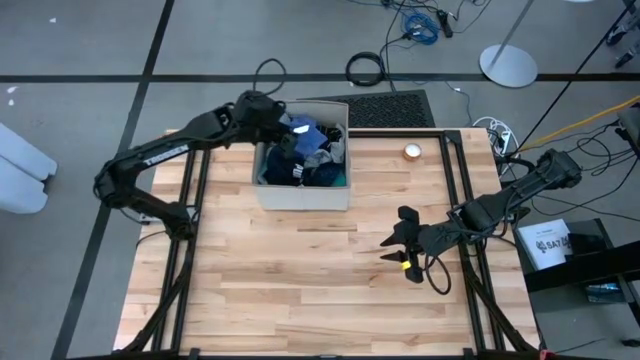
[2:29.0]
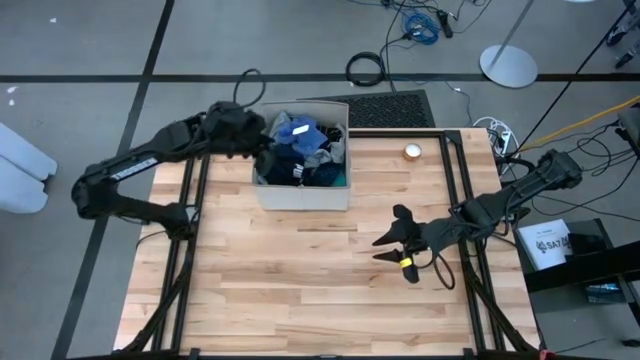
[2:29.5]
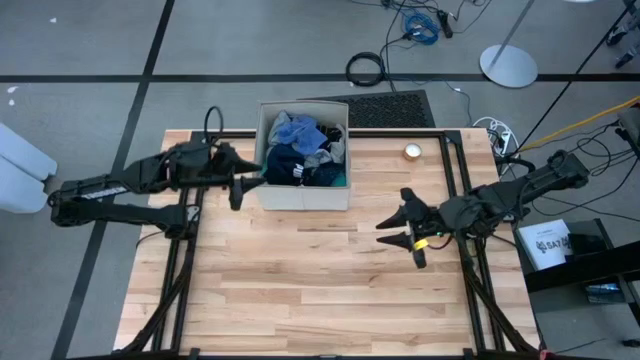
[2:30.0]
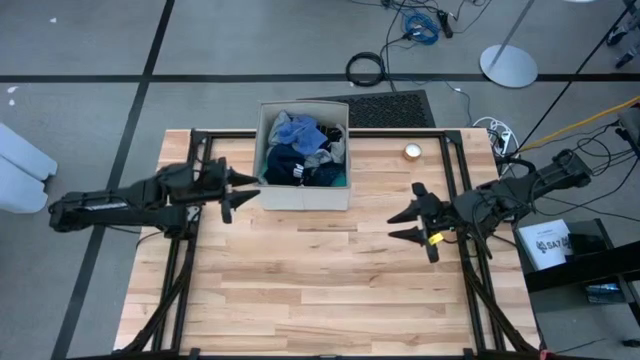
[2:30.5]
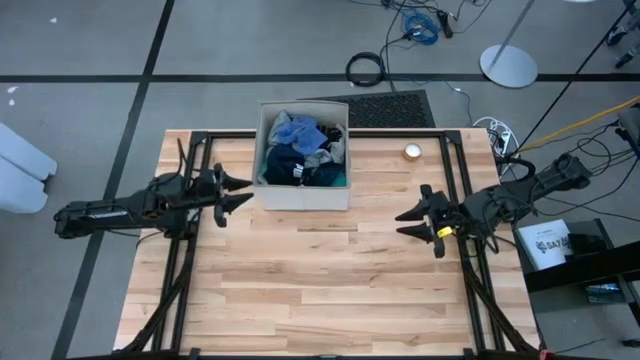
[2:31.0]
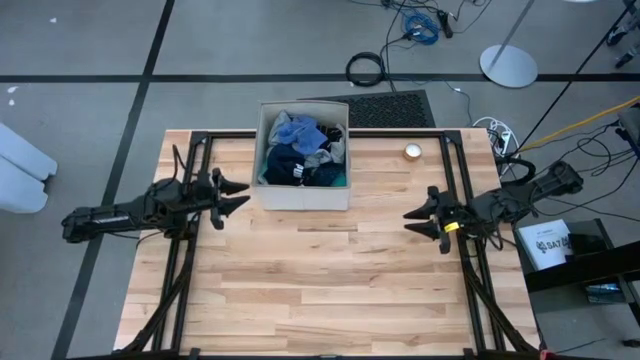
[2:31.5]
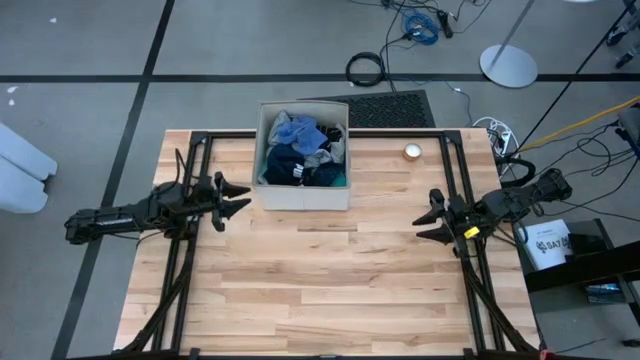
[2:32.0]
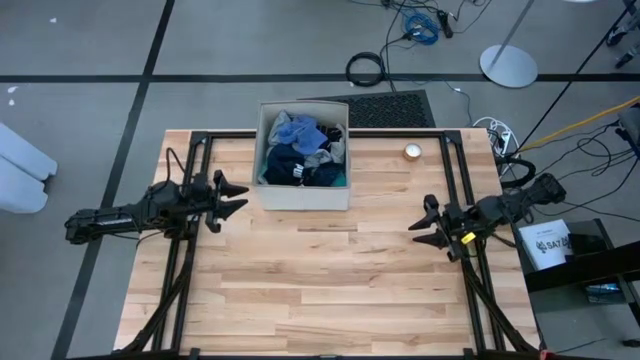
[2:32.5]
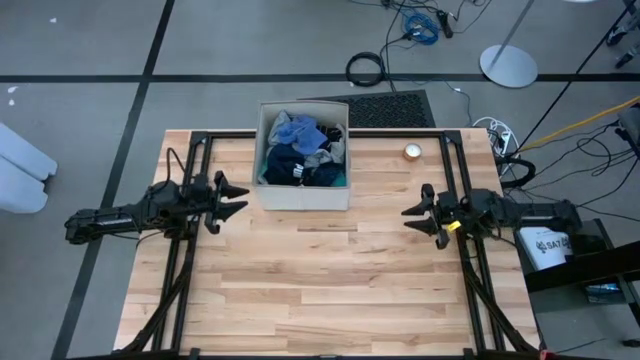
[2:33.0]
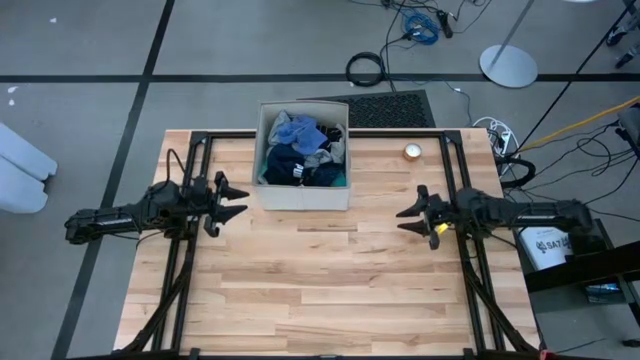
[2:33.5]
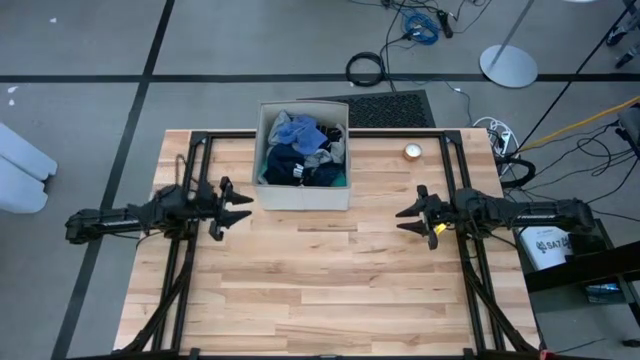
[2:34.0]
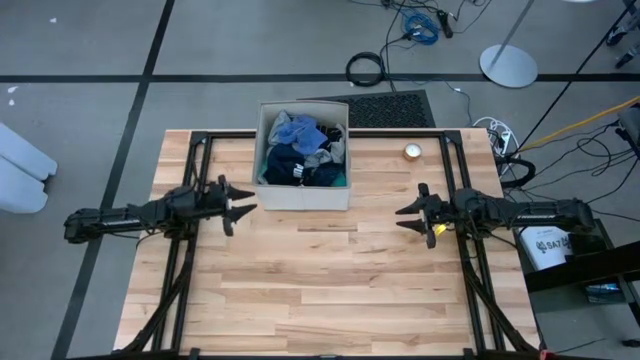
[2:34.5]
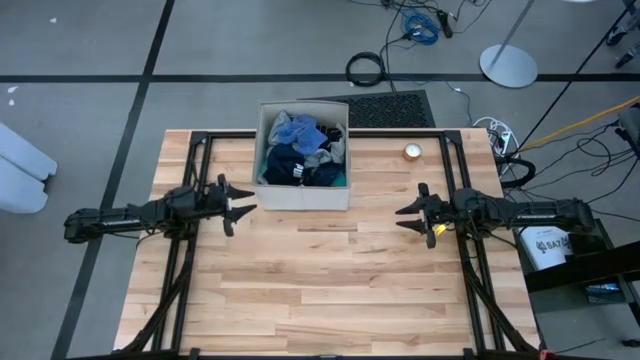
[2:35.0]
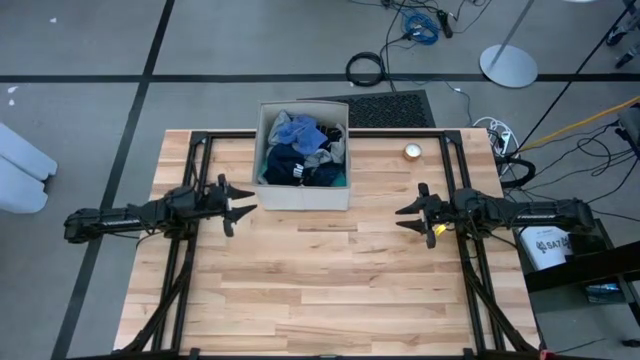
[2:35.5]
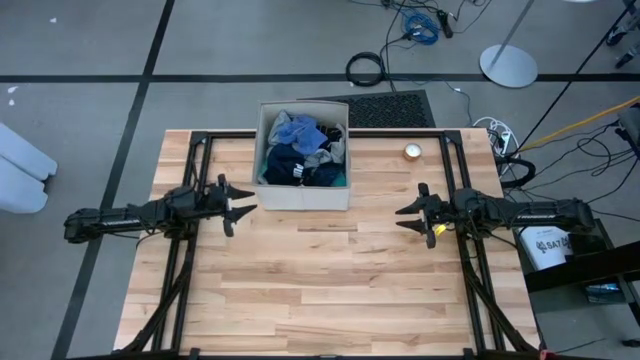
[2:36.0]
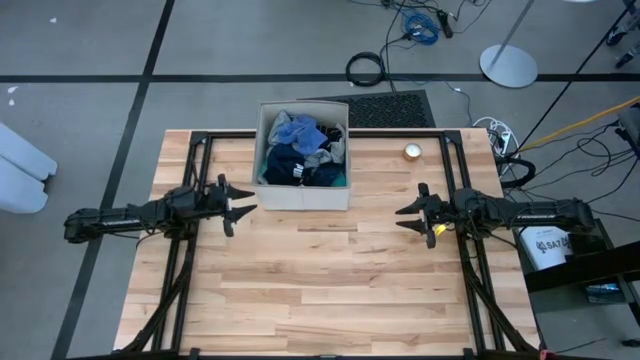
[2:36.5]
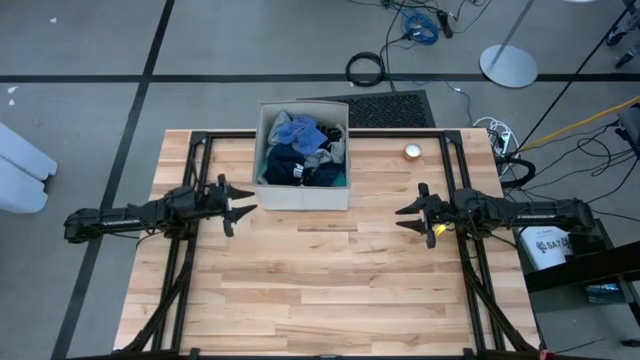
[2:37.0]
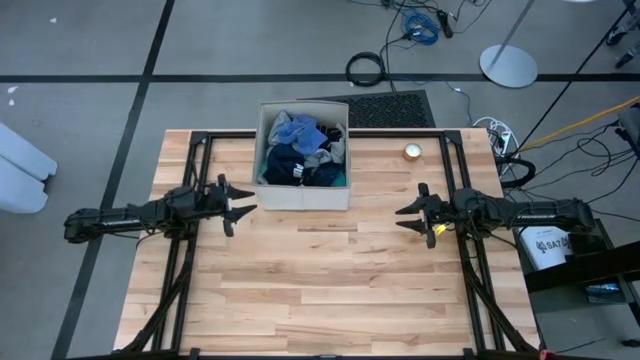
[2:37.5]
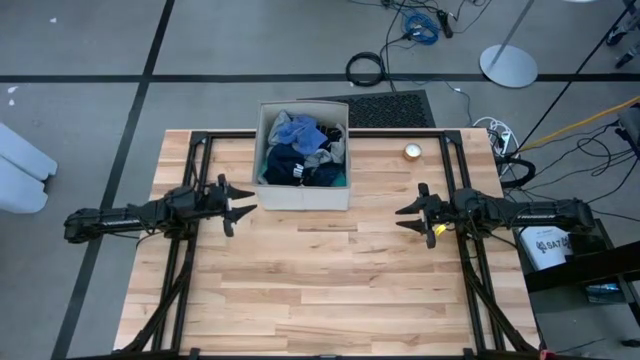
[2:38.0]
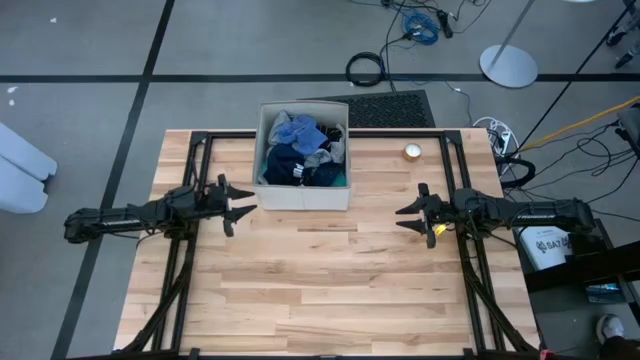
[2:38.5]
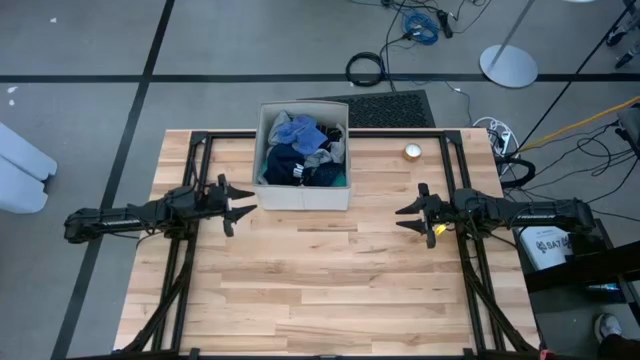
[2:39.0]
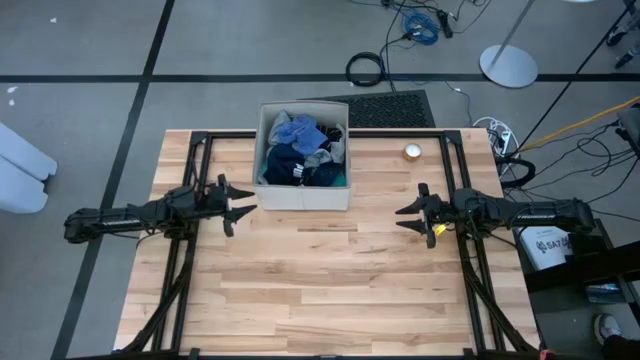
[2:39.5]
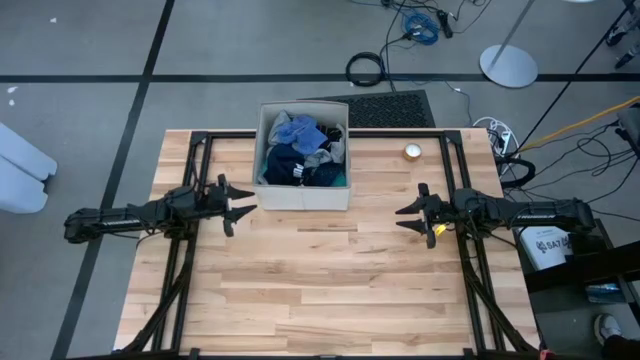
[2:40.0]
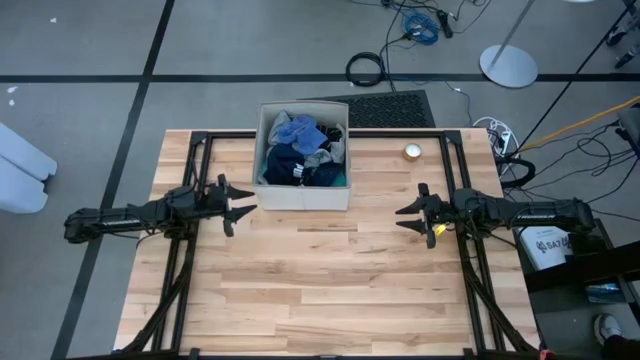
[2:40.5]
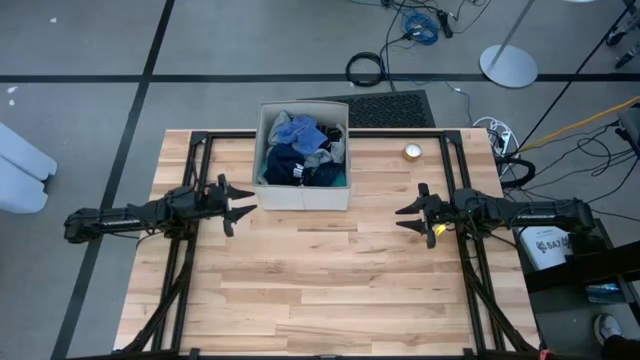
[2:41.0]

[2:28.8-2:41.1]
Task: Sort clothes
Return to Home Position

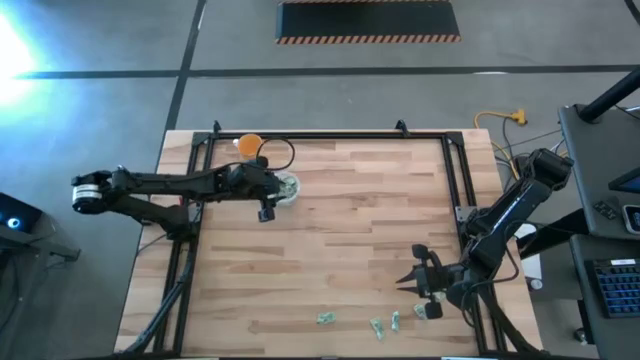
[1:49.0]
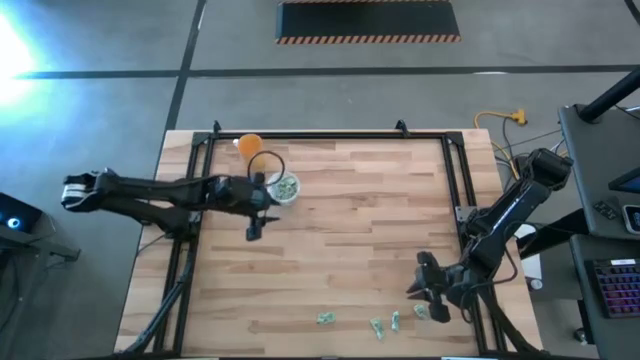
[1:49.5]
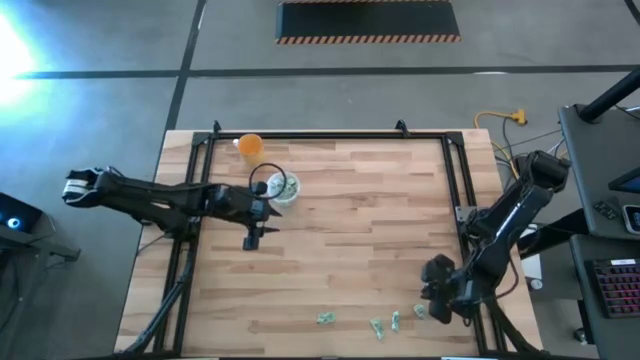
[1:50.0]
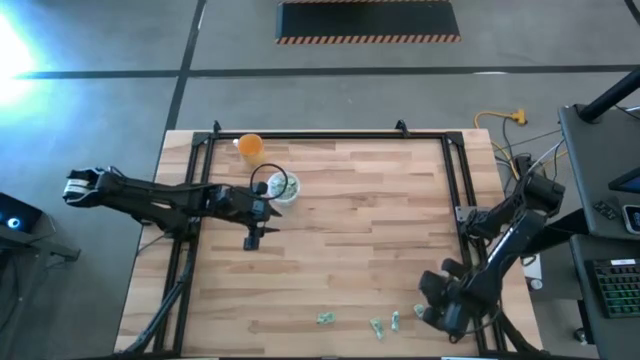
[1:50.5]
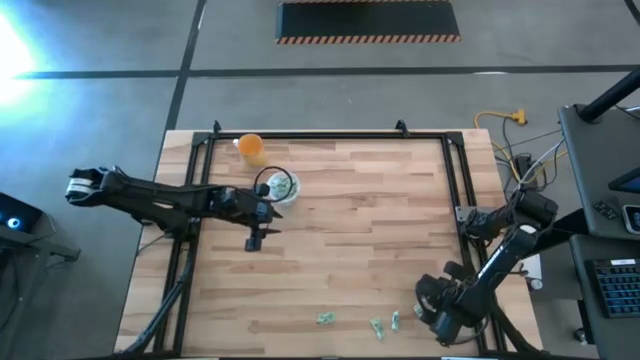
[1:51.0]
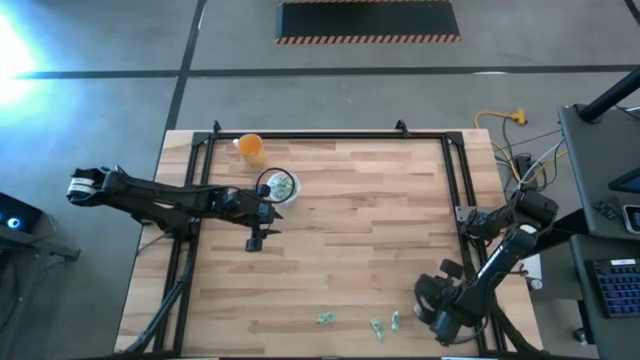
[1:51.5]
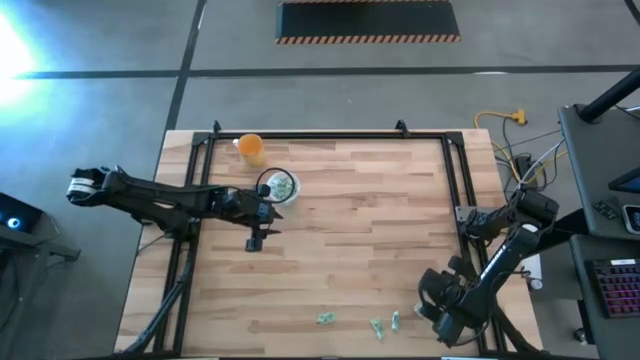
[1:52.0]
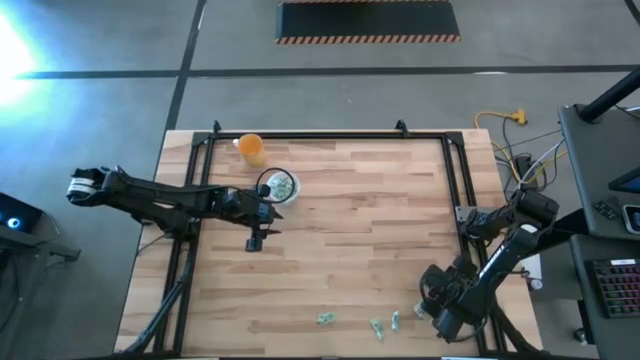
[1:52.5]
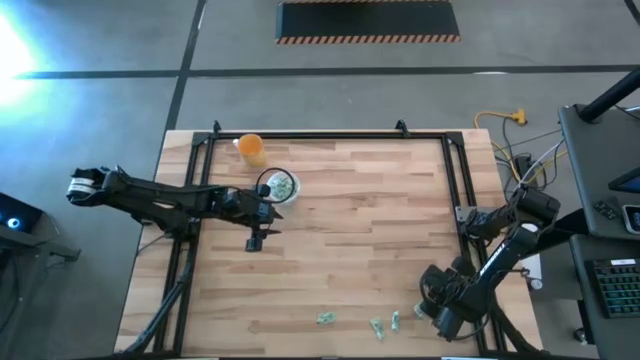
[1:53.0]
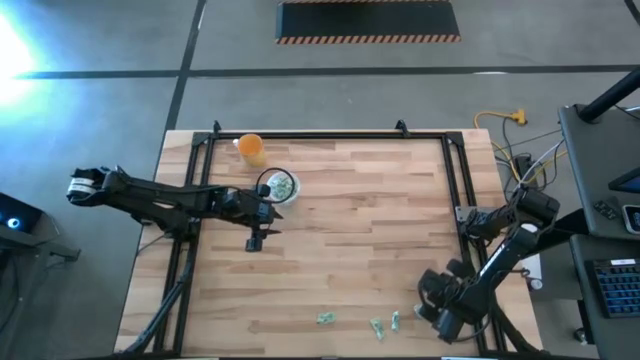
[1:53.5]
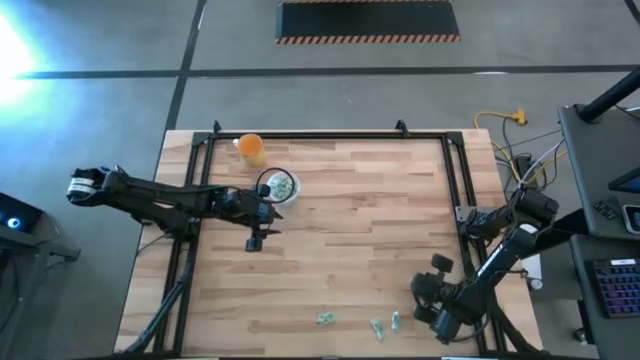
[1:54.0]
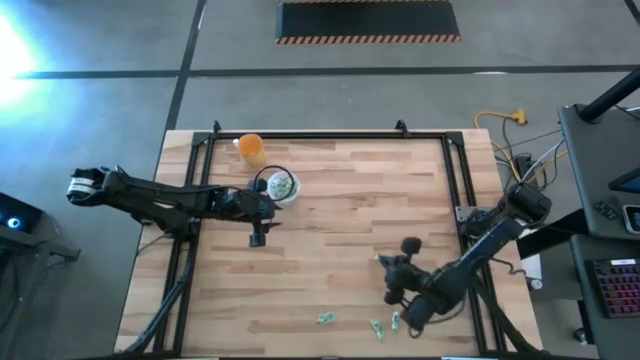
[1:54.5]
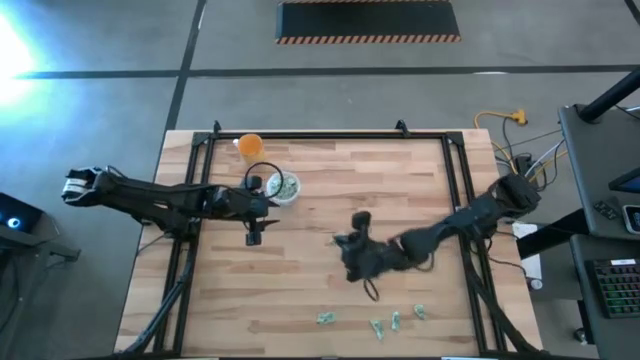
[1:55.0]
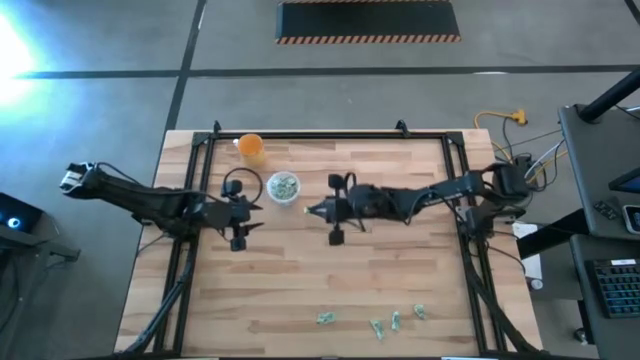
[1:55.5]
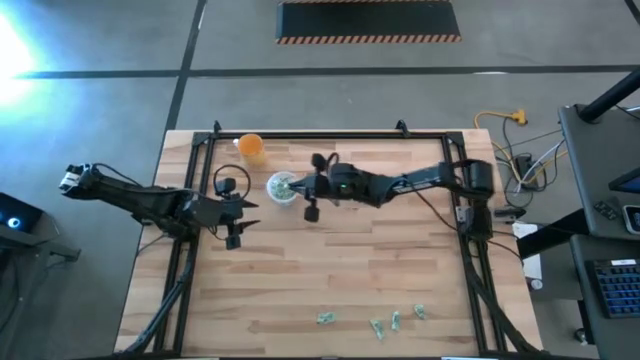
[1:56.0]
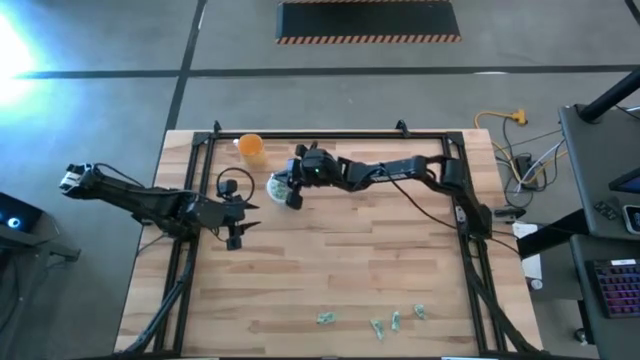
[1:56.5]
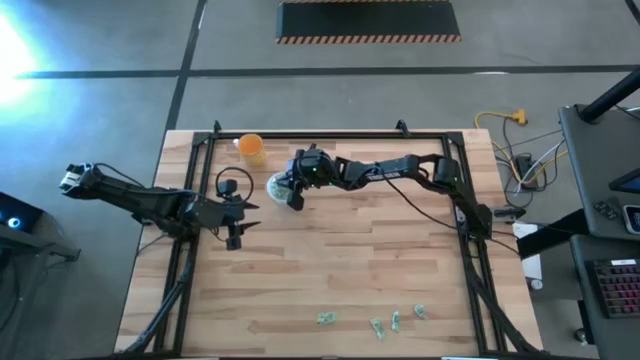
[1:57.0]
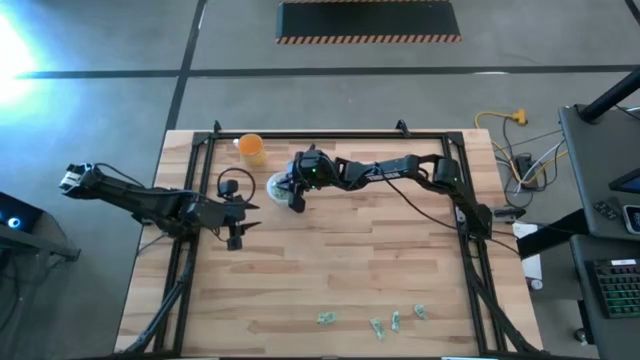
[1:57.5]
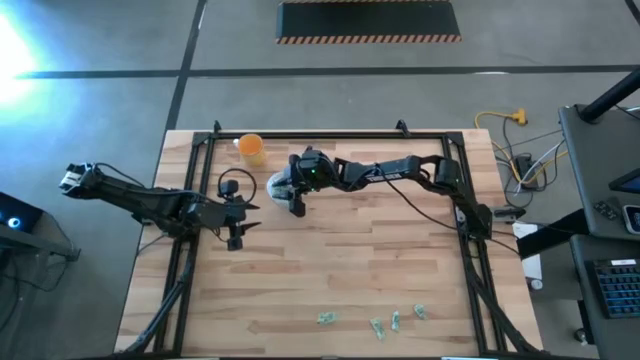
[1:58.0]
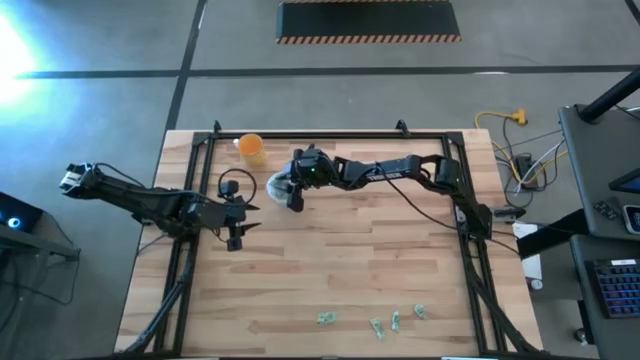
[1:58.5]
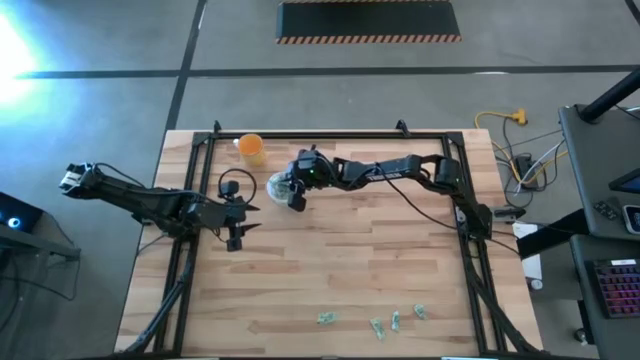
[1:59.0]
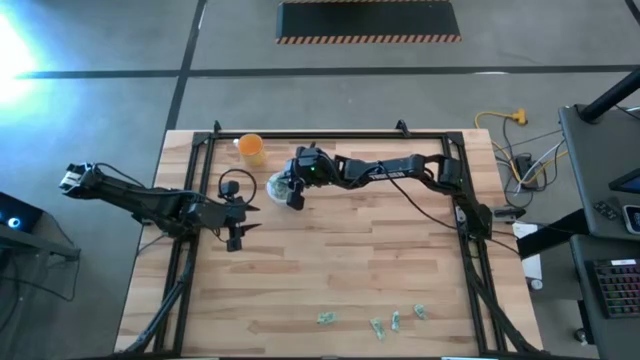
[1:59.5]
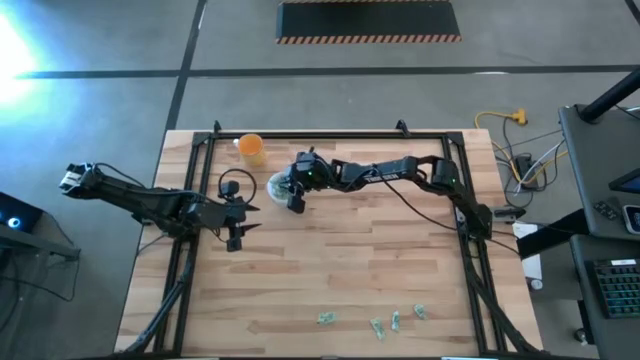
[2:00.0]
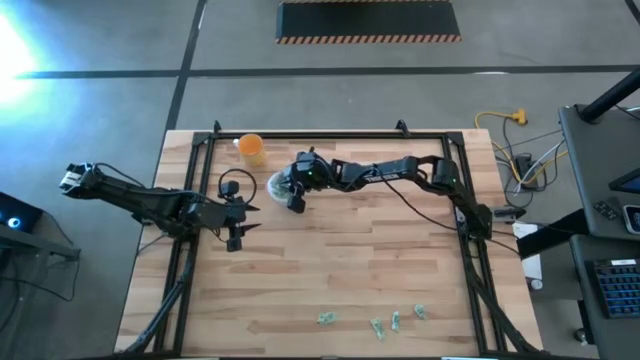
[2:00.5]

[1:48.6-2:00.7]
Task: Pick and place Stevia / Truvia into bins
Put the stevia packet into the transparent container
